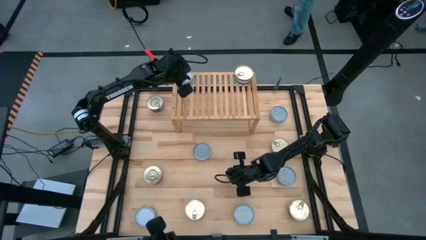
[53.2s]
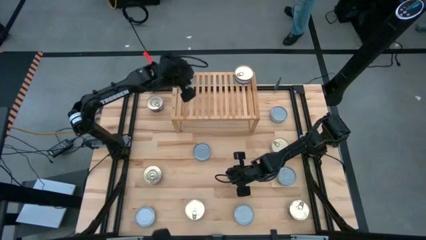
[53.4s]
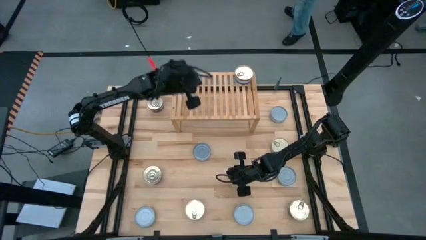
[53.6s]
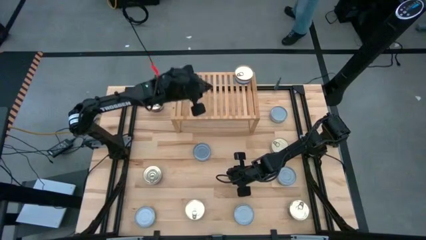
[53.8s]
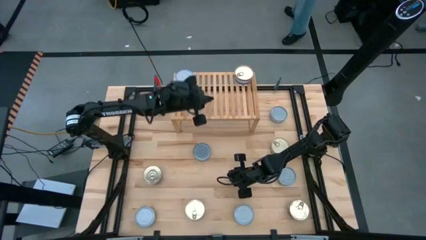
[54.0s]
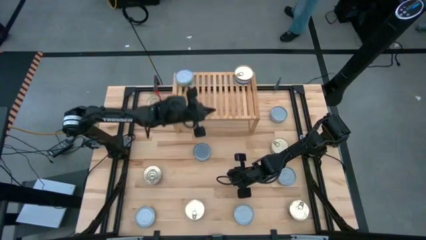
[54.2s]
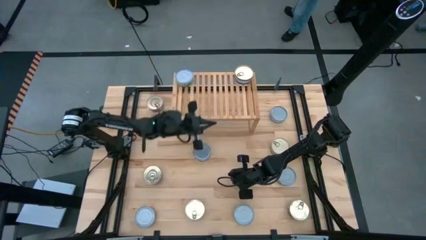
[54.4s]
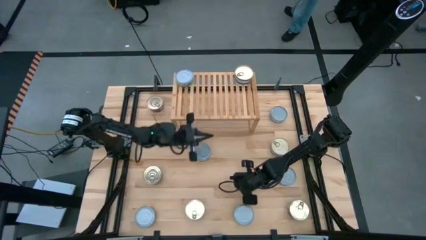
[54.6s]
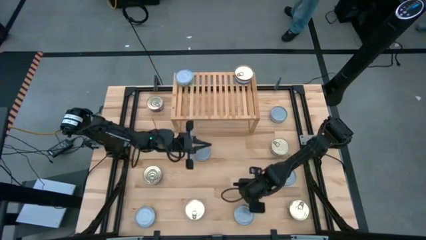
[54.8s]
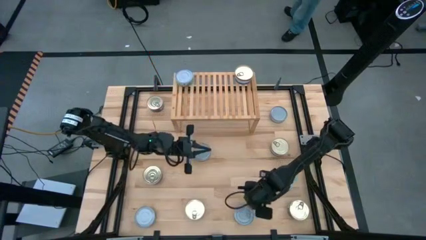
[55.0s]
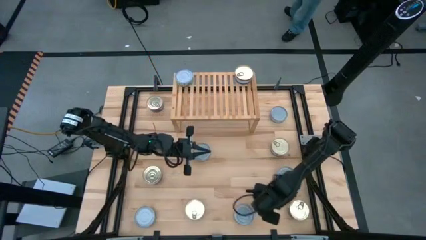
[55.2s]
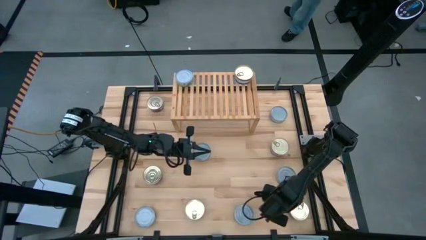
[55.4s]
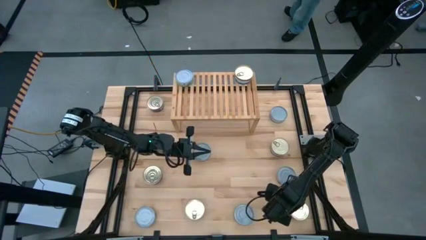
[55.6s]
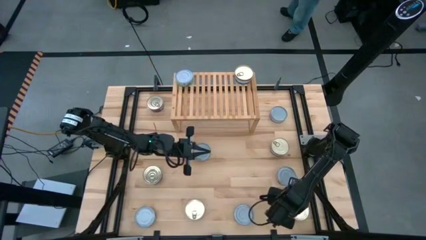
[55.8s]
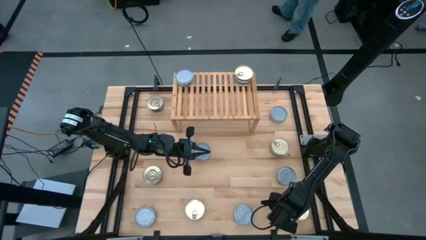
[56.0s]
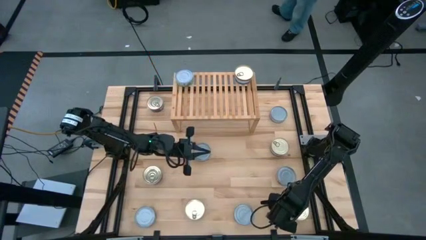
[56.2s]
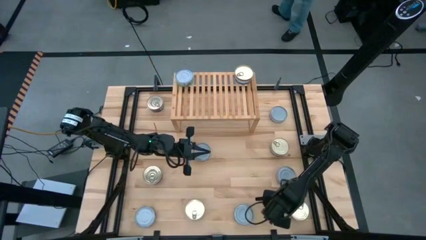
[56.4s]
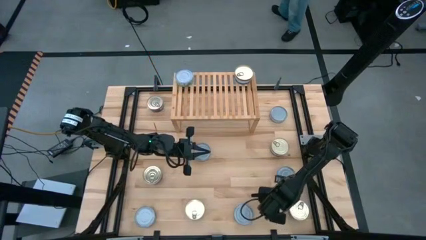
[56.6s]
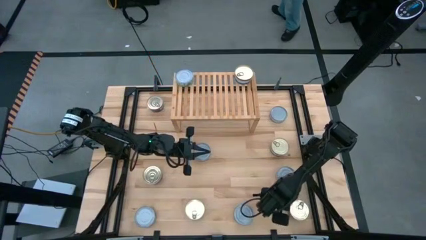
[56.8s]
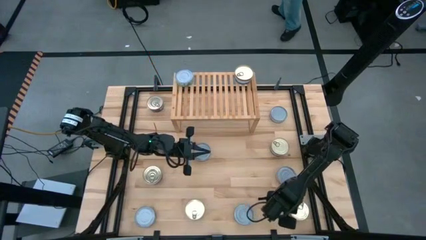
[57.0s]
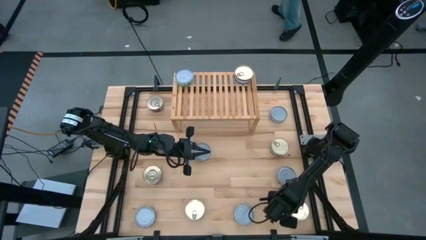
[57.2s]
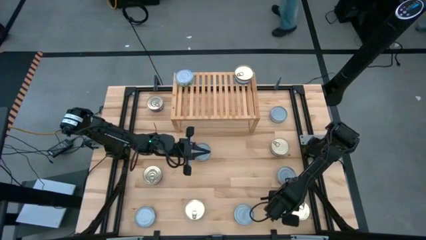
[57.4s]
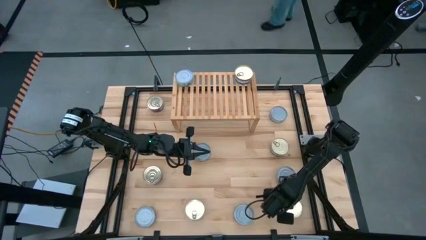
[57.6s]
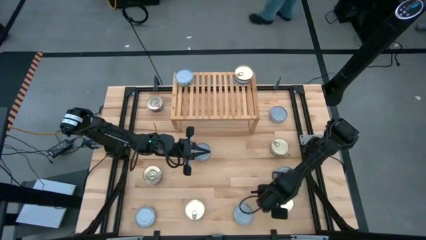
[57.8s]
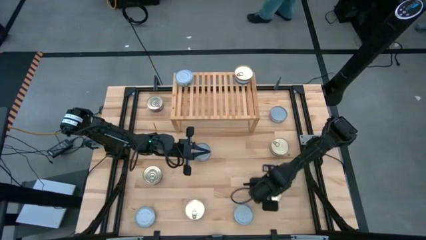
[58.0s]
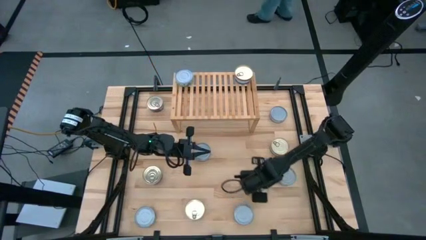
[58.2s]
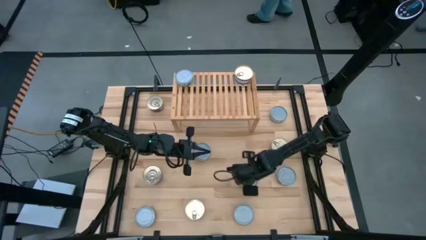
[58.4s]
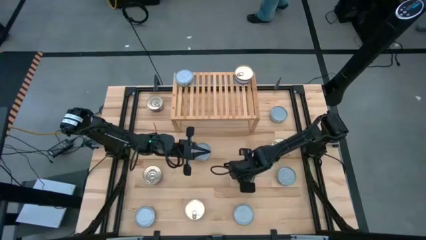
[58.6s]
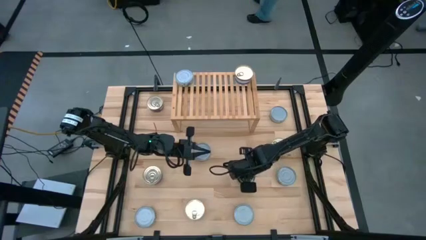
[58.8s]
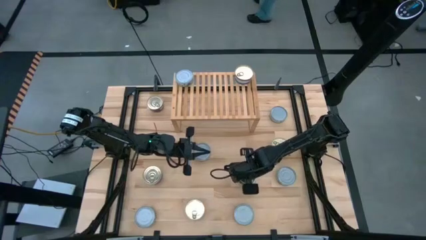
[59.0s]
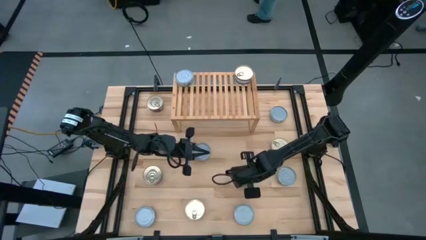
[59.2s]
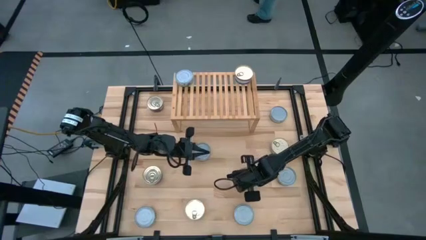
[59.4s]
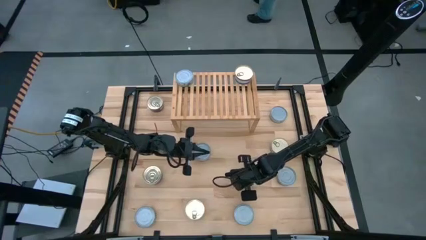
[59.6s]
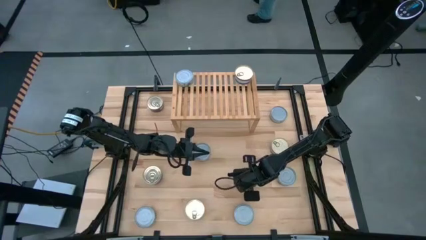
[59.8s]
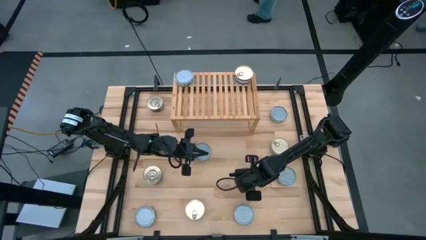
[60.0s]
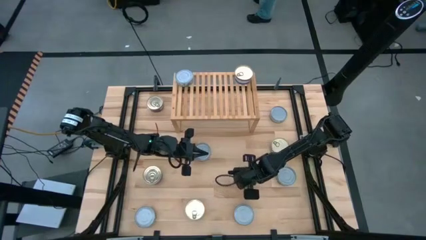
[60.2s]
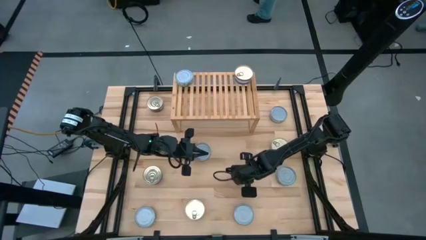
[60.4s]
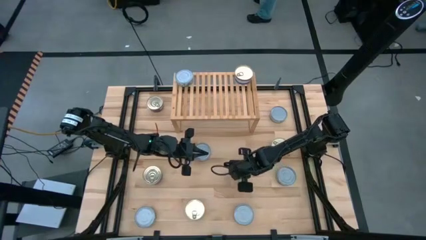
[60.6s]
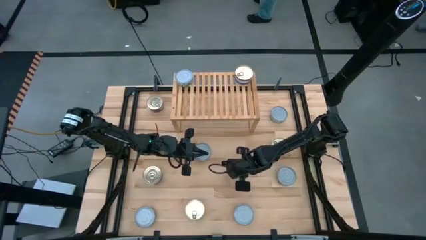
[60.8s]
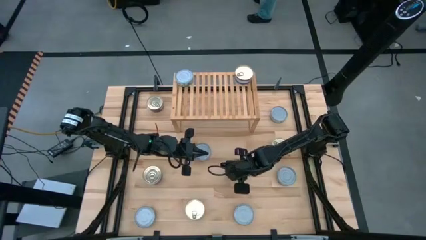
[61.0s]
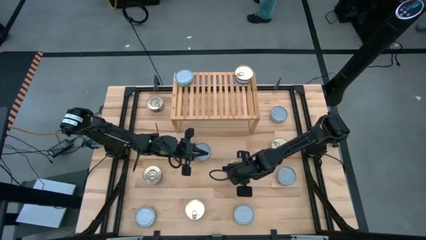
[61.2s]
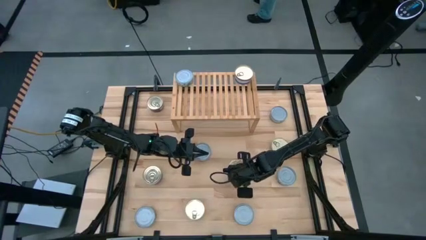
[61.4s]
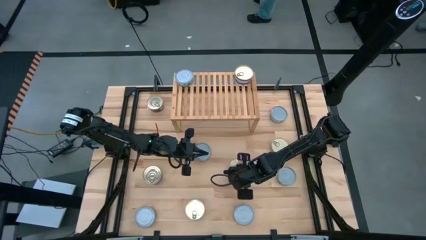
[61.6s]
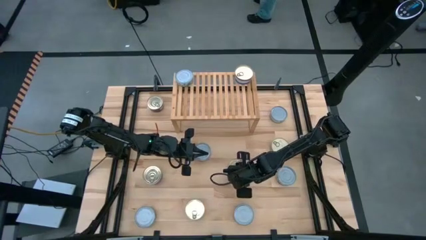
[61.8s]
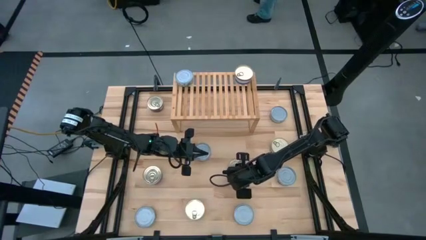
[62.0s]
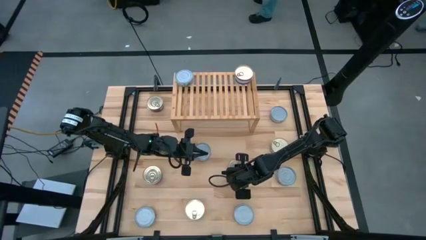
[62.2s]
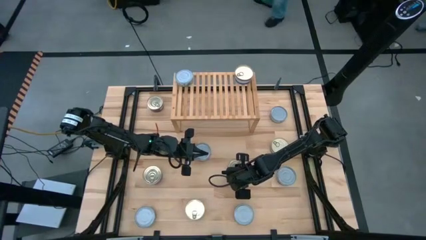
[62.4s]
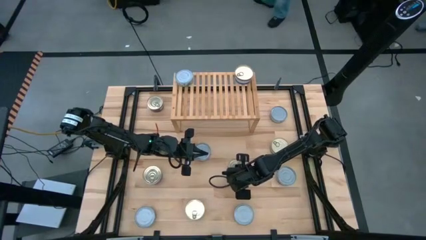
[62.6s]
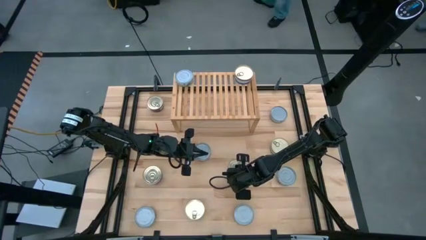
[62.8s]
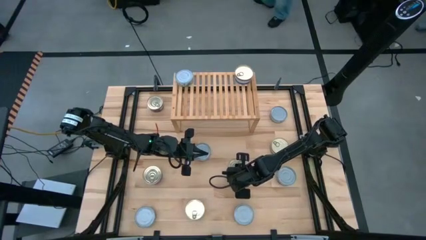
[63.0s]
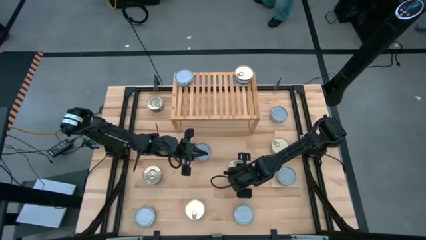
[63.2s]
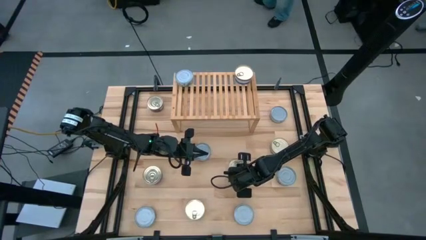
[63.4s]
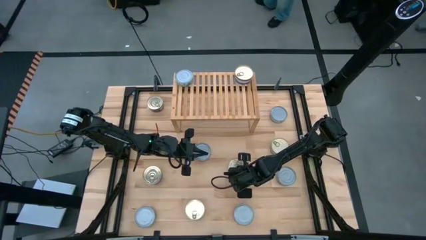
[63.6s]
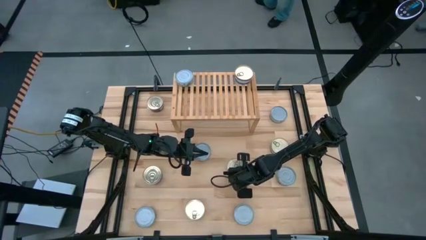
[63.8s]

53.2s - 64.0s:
Task: Stack canned seafood by type on shelf
Stack the blue tuna can on top of the other blue tuna can on the shelf

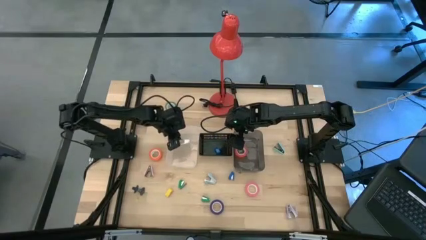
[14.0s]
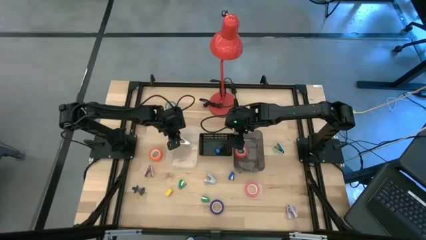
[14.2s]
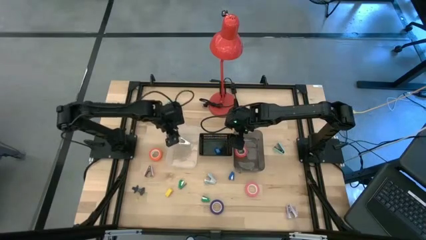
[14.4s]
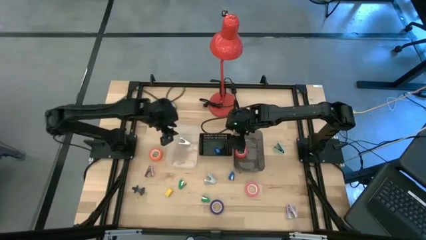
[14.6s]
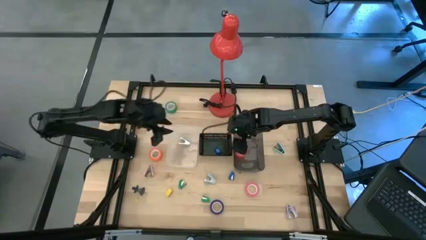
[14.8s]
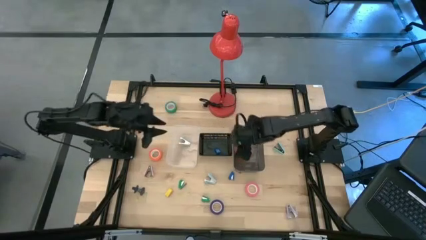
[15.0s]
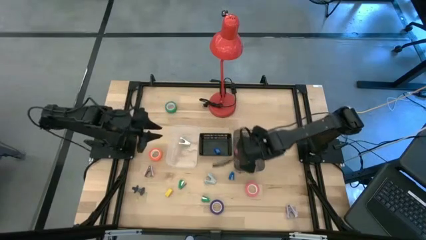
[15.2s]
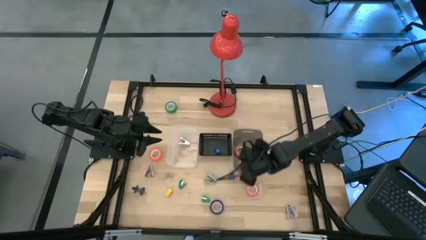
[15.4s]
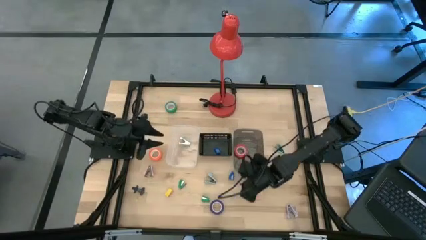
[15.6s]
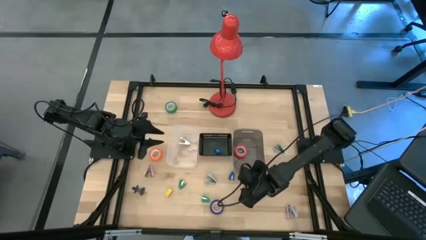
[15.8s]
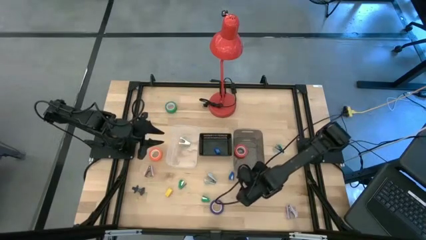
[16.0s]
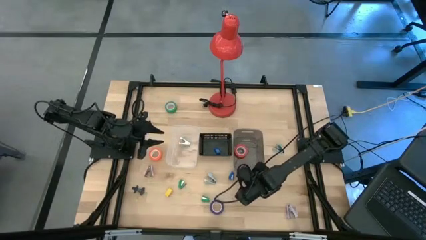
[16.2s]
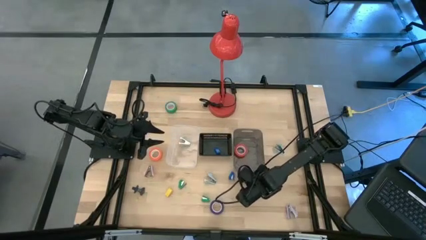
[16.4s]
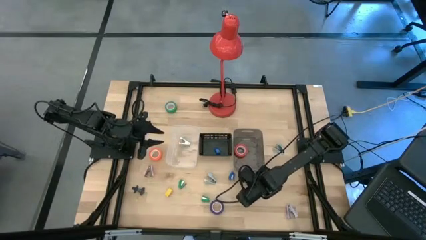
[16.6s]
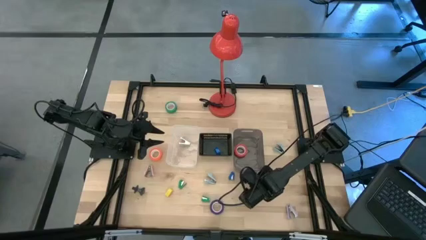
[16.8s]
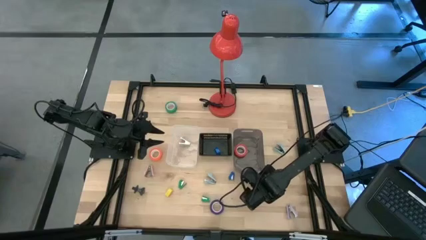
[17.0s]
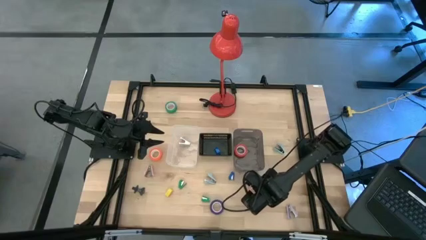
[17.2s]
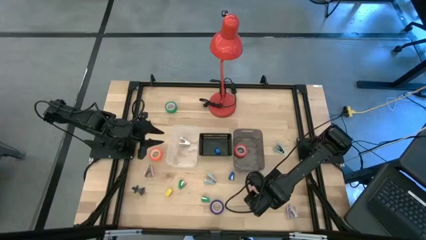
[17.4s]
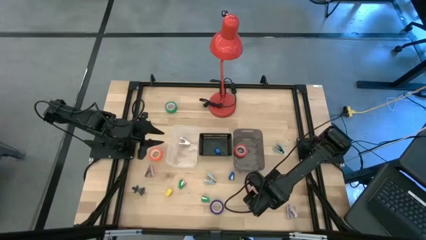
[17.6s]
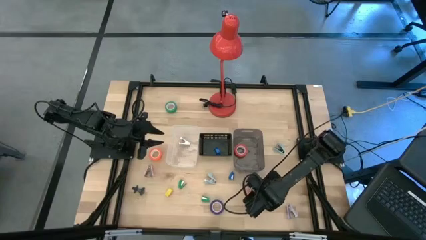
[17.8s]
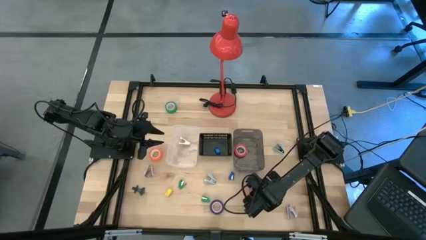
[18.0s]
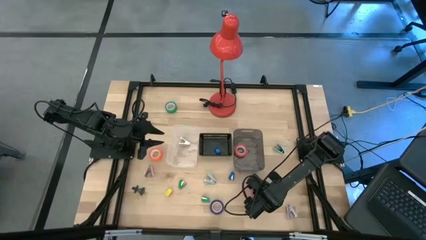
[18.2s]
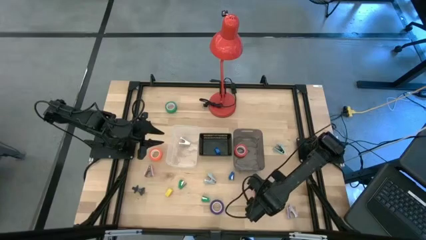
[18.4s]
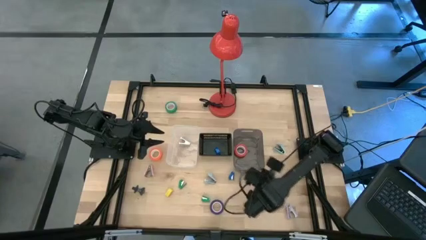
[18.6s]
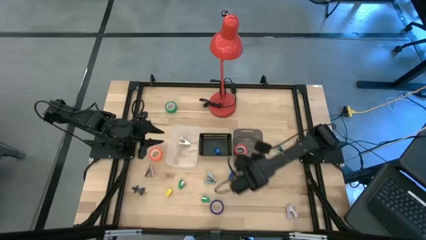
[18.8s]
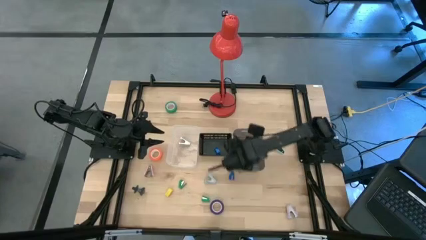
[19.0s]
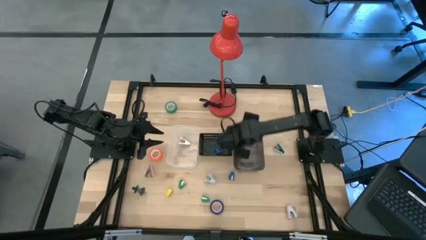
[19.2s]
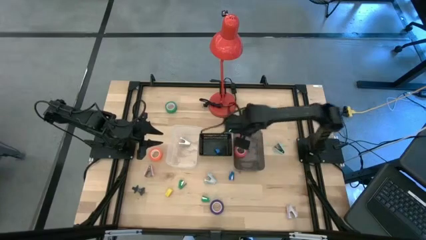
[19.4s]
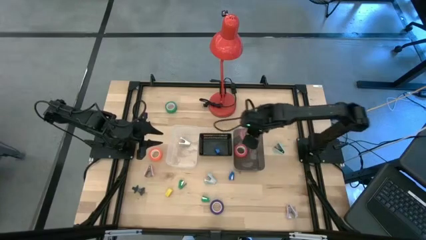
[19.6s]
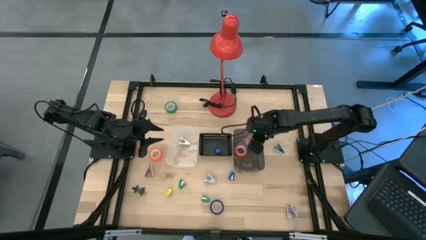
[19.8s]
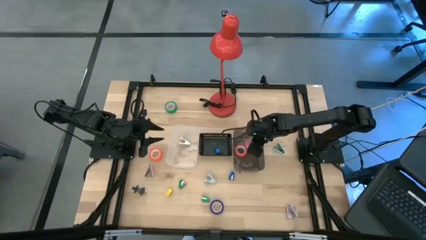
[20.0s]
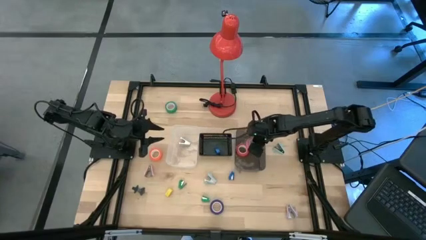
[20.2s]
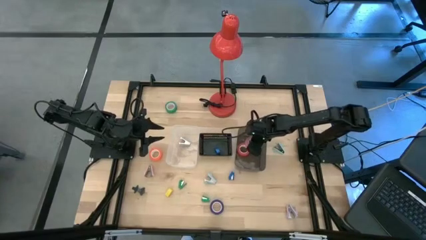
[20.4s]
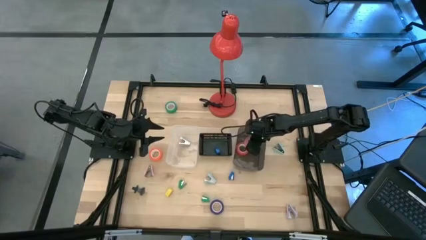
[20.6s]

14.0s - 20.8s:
Task: Pick and place Stapler, Stapler remover, tape
Put the pink tape into the black bin
